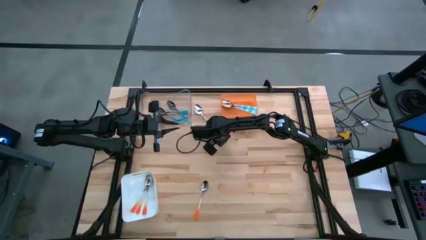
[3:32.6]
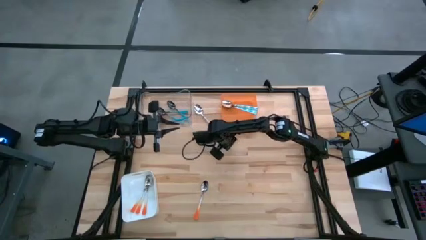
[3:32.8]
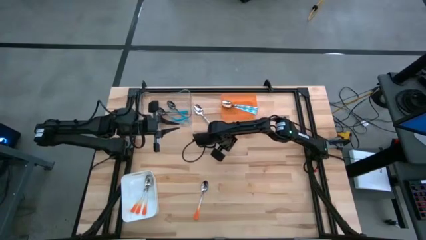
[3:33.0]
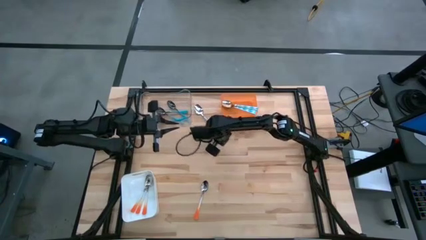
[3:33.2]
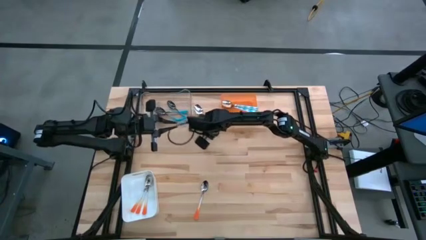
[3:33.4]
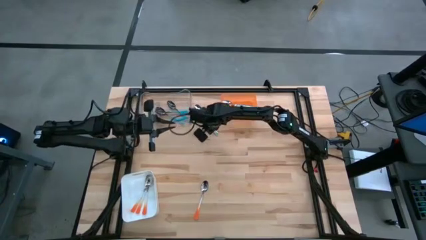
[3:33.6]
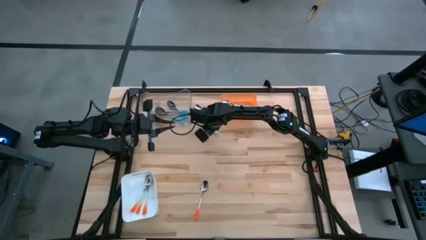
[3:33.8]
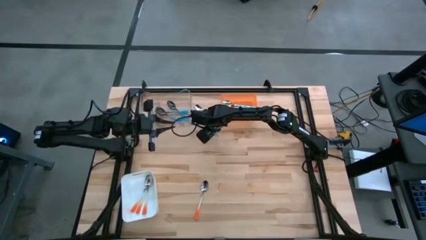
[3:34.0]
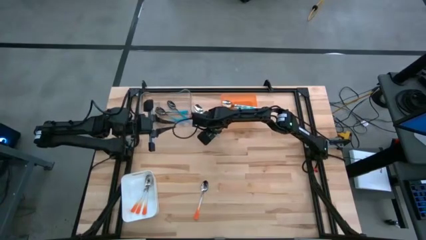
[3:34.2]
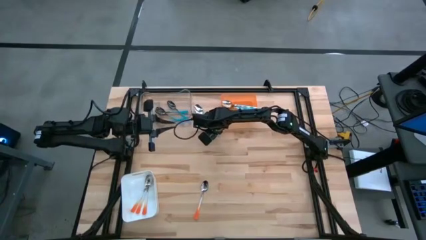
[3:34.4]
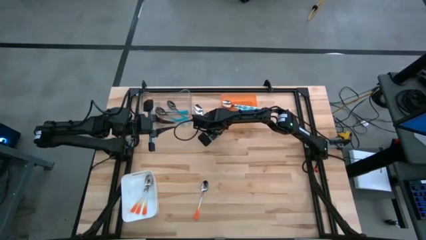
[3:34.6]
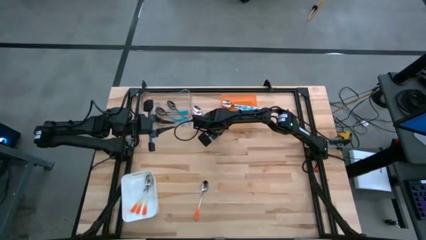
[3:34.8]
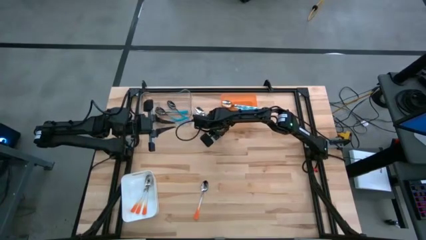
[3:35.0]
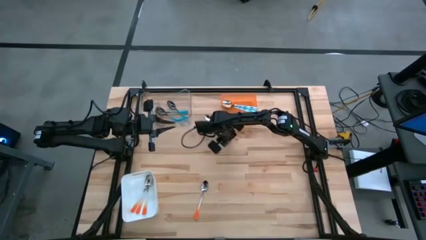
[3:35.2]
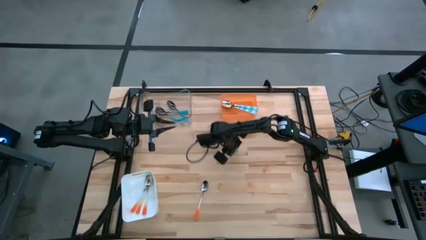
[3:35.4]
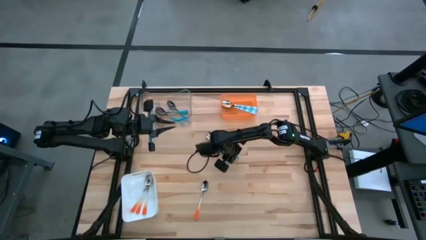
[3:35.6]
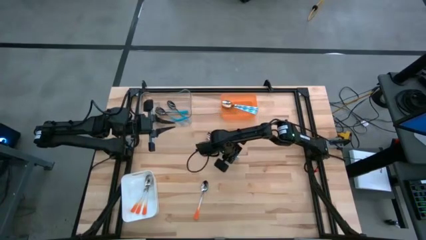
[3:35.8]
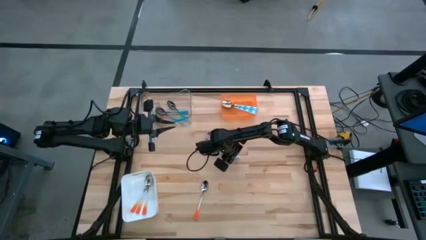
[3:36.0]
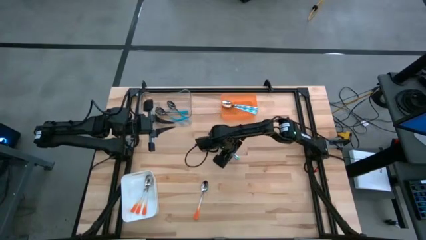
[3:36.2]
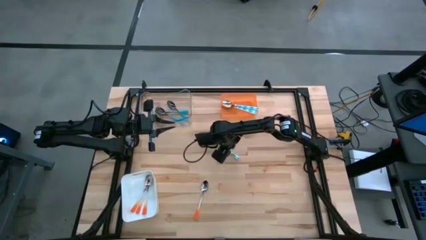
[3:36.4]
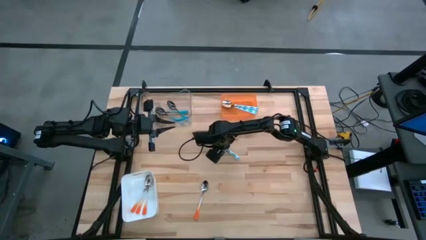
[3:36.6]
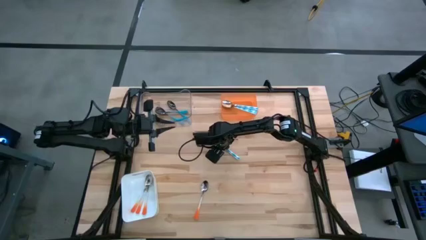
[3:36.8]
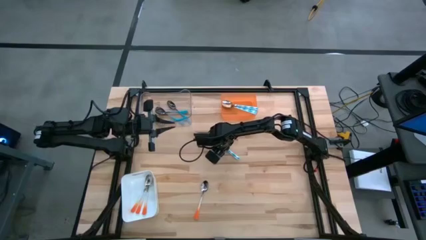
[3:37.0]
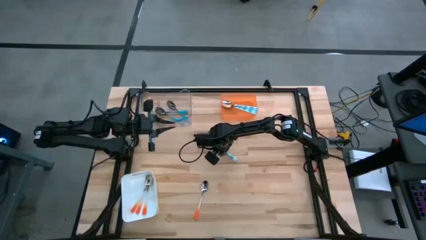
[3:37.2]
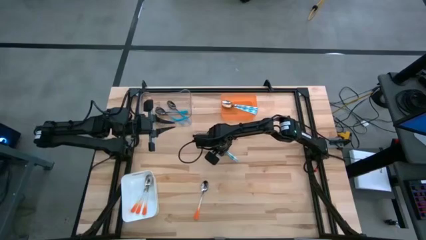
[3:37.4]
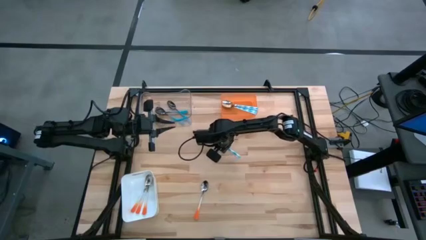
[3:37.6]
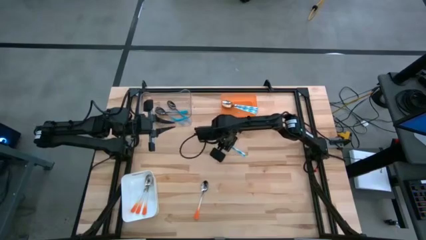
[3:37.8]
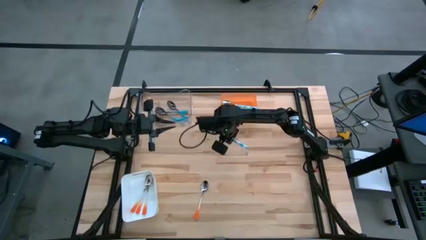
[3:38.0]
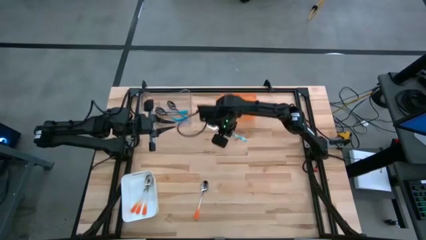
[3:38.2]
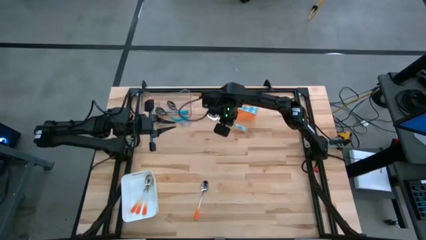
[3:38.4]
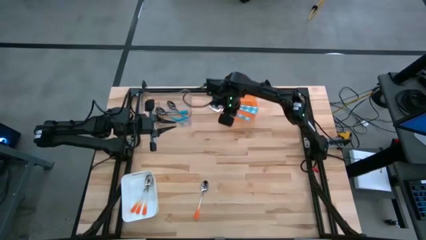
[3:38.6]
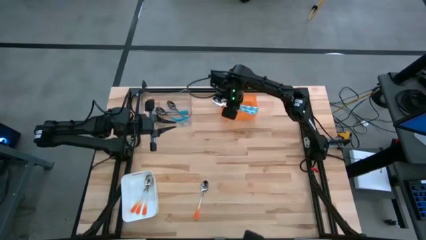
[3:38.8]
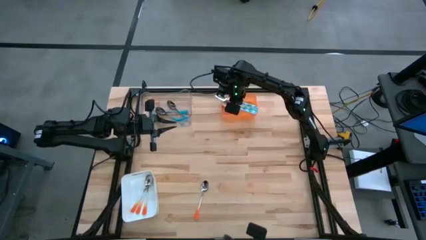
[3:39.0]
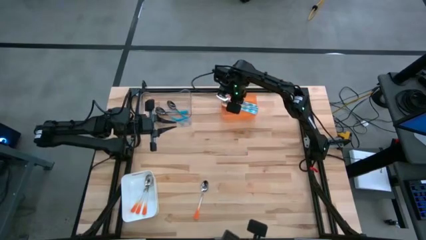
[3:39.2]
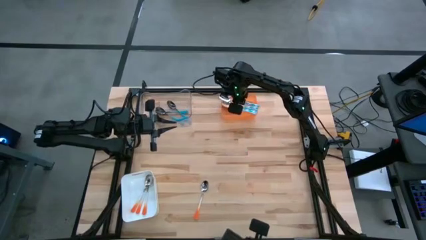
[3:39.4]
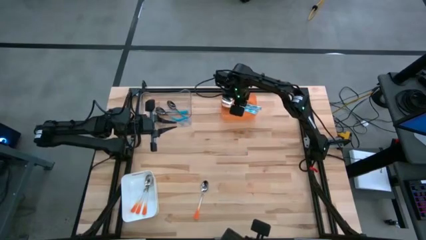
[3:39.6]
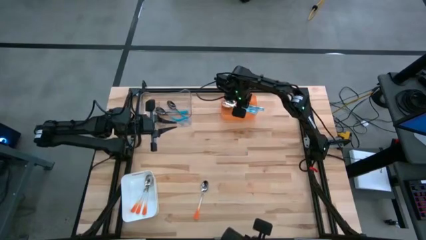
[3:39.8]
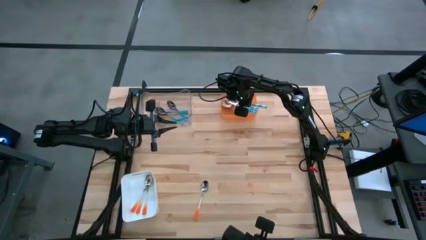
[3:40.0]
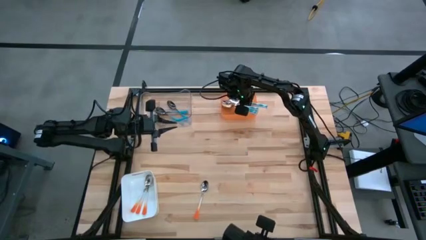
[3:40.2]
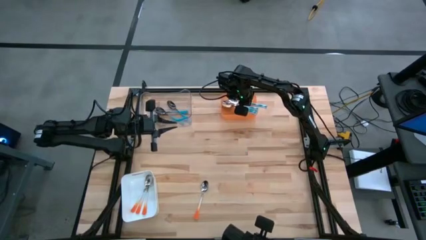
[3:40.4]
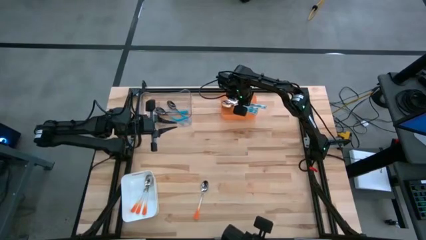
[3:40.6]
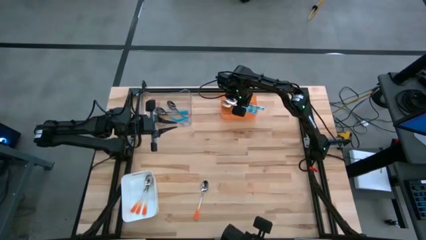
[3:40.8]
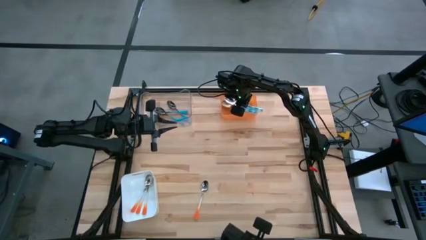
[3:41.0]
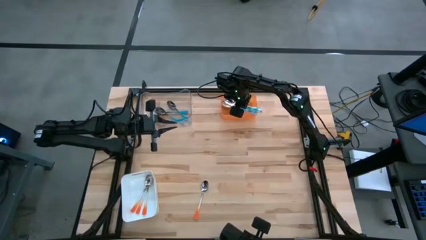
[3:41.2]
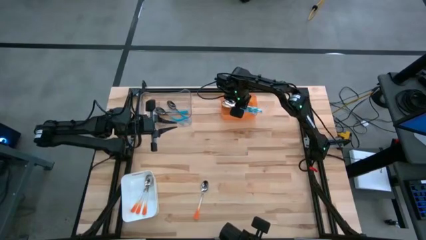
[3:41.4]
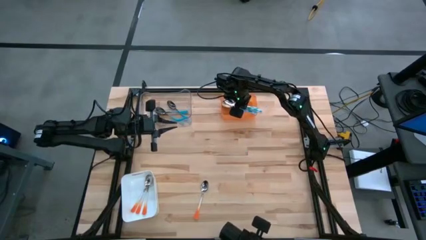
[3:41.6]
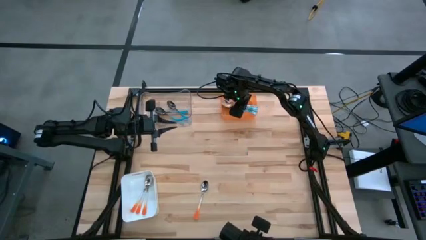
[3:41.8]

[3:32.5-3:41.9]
Task: Sort silverware by color (type)
Put the light blue spoon into the orange bin

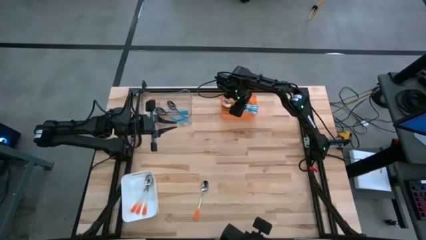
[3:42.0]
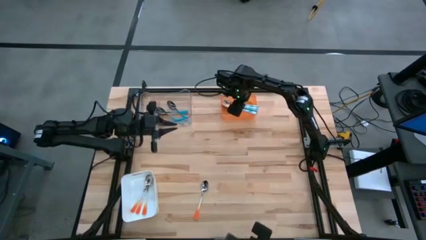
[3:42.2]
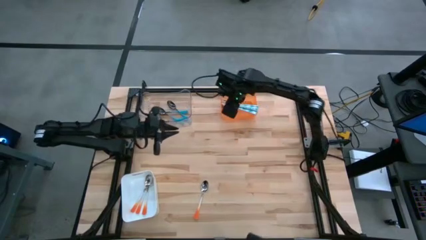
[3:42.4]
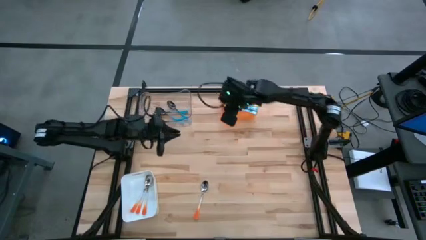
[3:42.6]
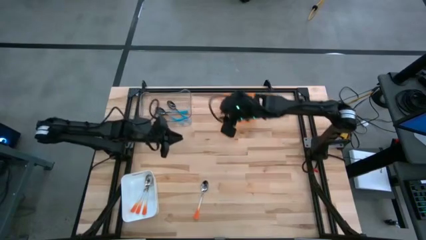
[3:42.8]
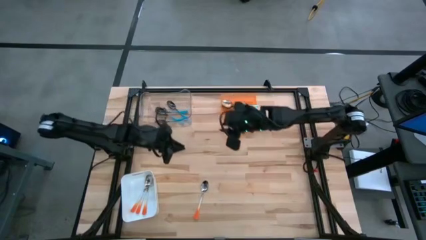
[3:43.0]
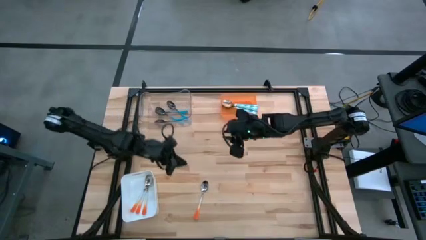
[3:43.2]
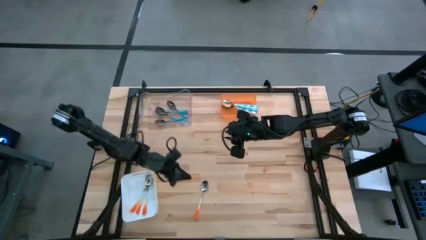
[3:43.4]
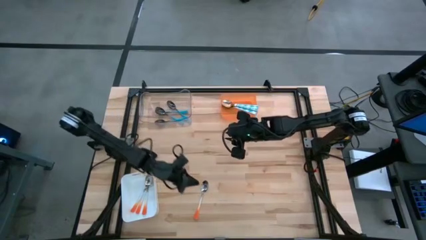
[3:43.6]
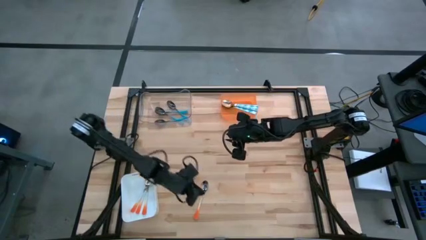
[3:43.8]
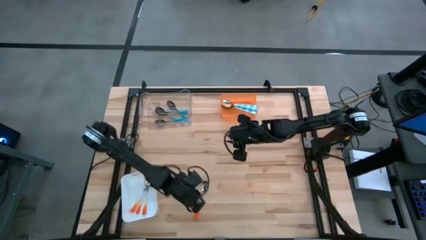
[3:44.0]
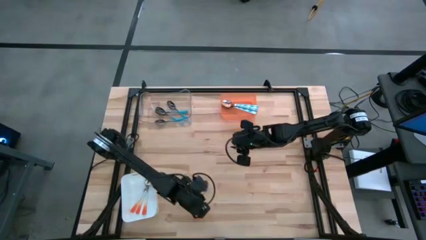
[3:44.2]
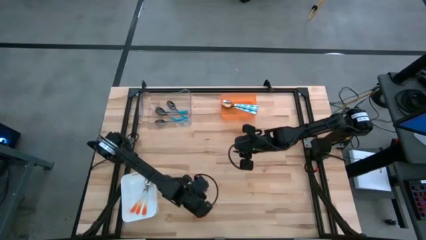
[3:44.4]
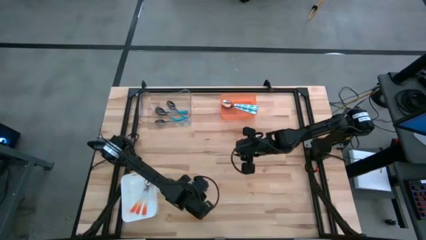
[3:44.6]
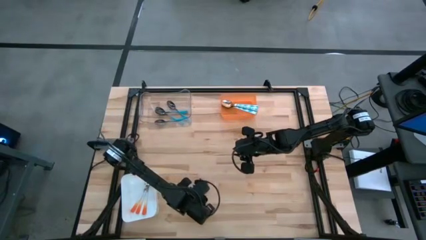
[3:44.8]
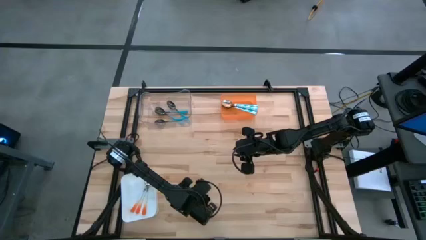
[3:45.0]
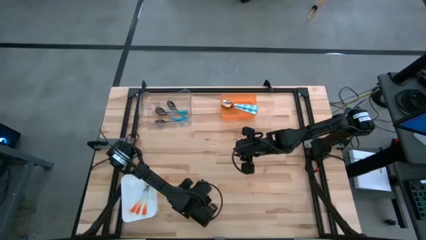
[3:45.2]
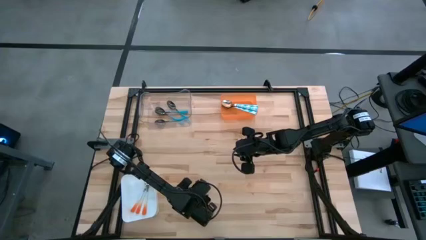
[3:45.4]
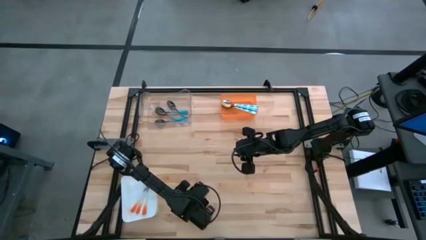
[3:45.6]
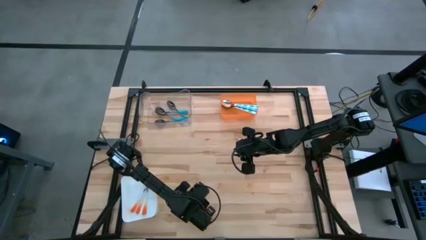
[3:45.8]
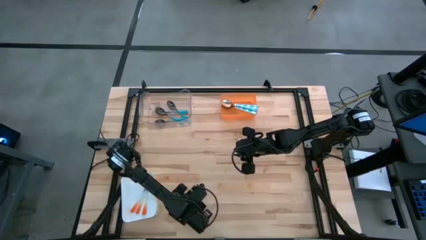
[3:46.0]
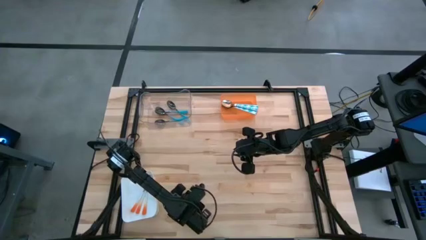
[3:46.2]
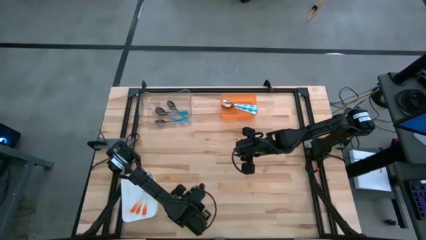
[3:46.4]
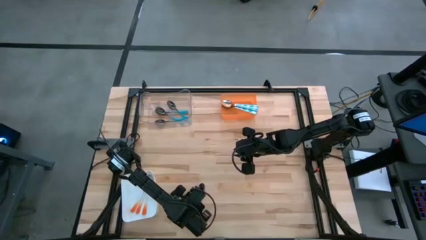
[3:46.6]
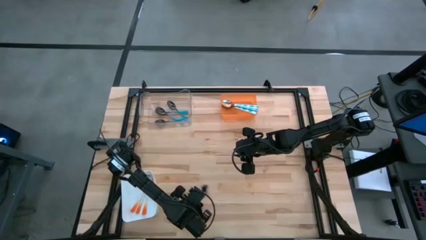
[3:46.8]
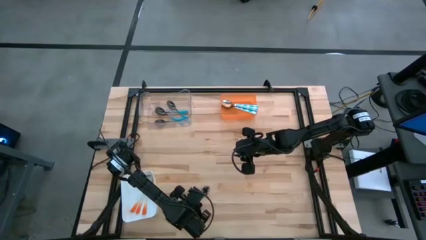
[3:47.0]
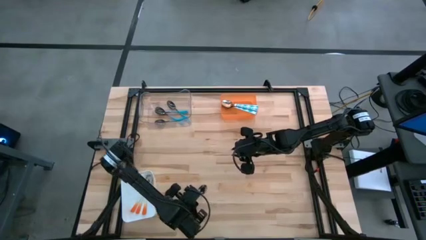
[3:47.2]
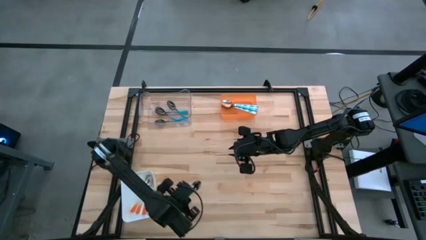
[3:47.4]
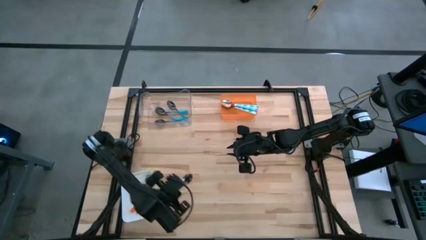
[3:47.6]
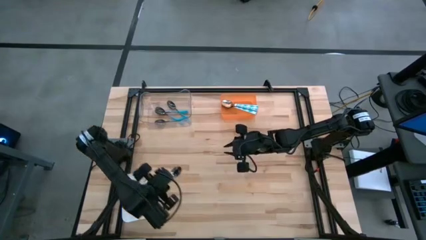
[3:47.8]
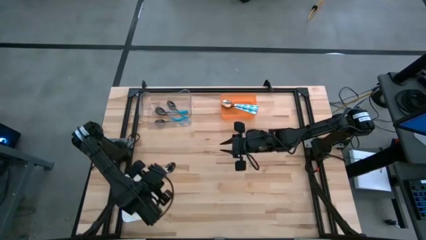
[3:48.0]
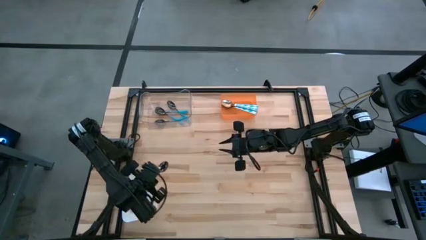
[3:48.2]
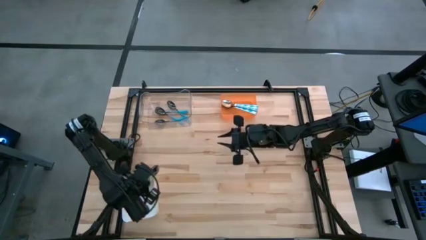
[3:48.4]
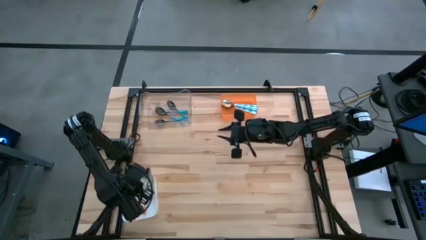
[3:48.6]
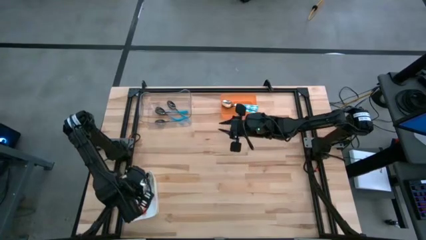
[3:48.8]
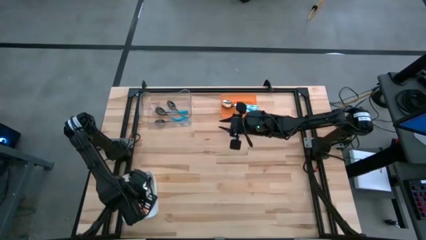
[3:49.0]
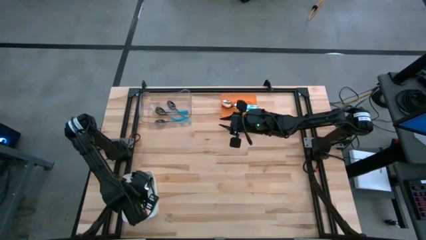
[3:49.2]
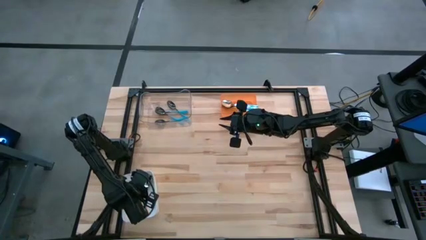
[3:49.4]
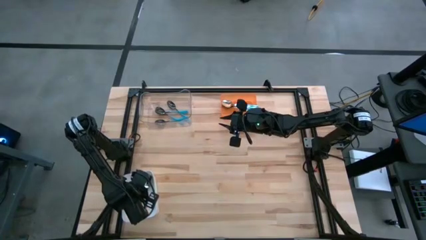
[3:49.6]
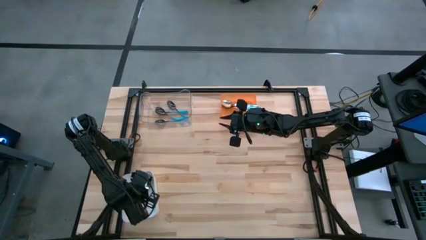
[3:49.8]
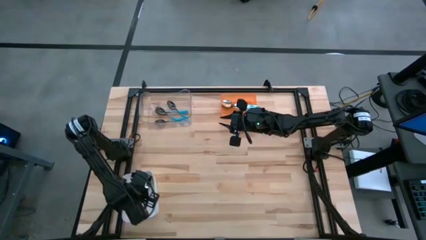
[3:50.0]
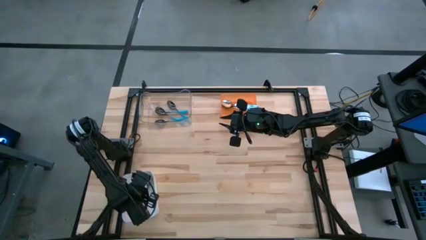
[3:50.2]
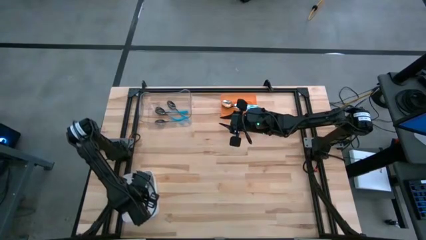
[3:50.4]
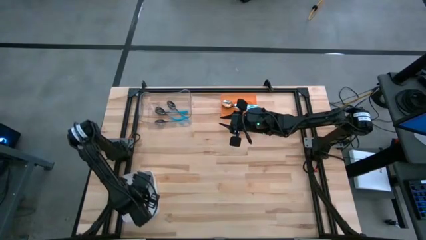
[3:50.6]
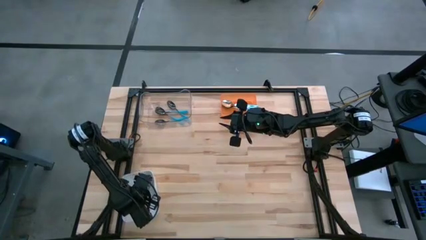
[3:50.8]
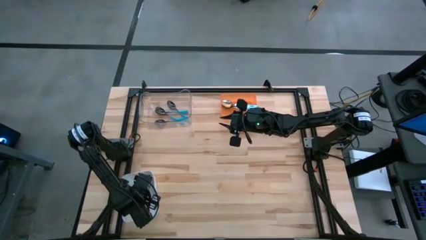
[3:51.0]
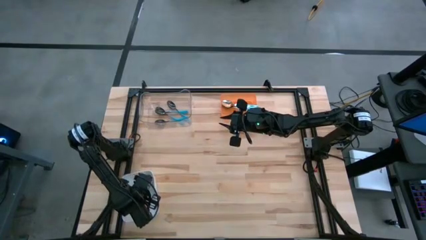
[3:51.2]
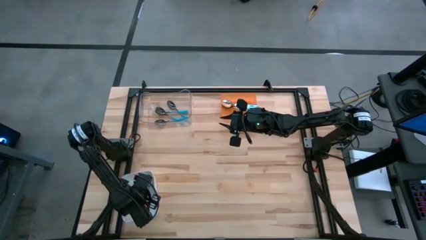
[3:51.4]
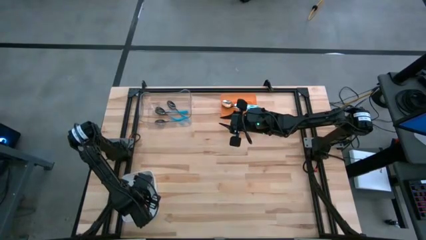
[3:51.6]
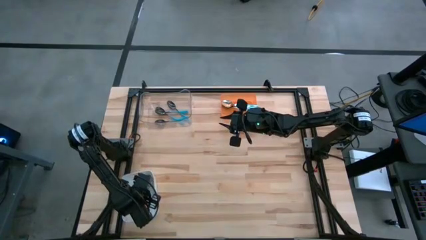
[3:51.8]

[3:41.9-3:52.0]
Put the orange spoon into the white bin
